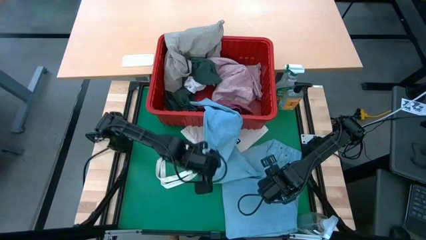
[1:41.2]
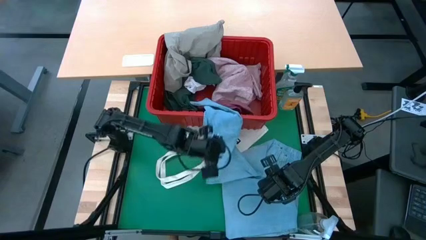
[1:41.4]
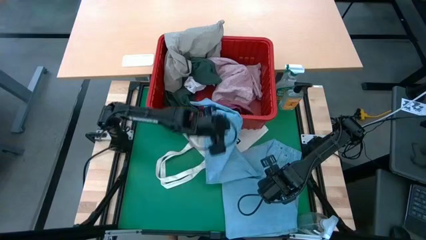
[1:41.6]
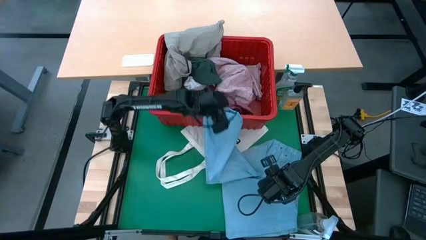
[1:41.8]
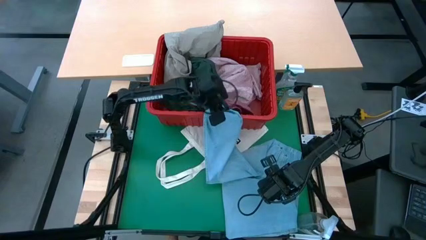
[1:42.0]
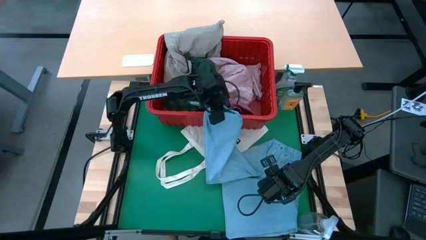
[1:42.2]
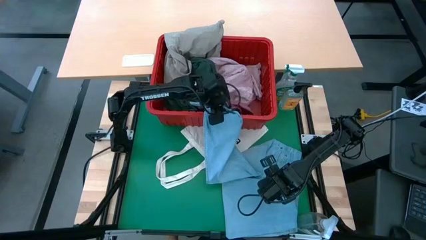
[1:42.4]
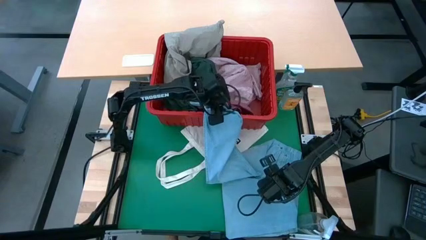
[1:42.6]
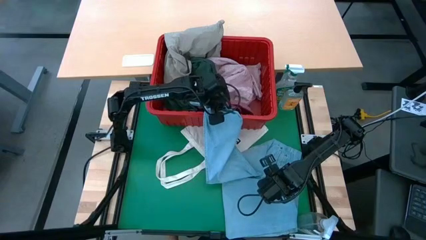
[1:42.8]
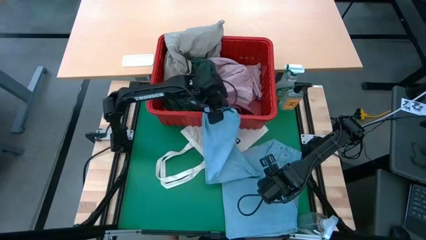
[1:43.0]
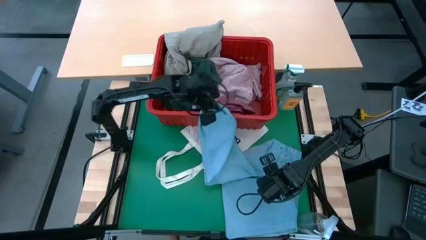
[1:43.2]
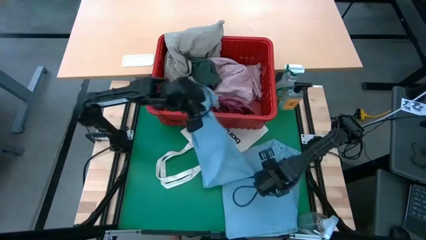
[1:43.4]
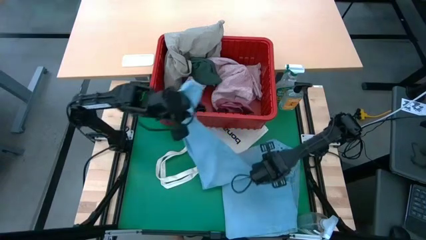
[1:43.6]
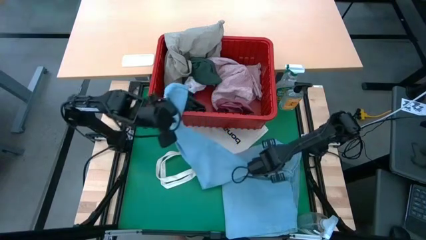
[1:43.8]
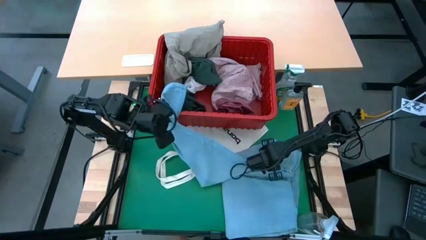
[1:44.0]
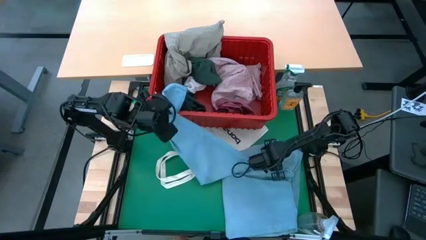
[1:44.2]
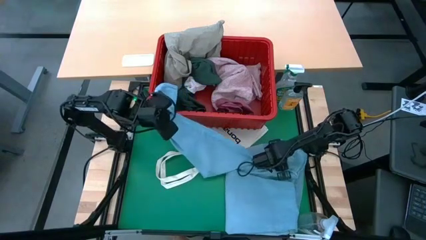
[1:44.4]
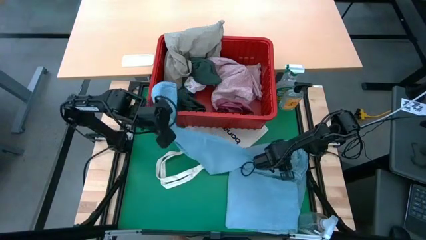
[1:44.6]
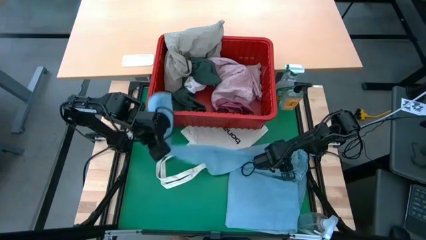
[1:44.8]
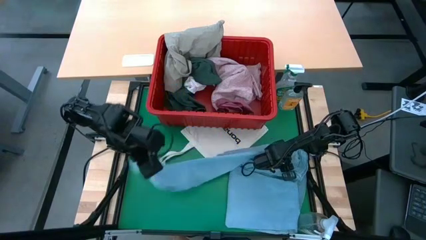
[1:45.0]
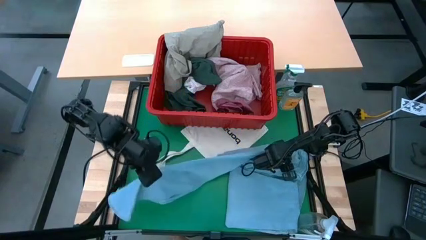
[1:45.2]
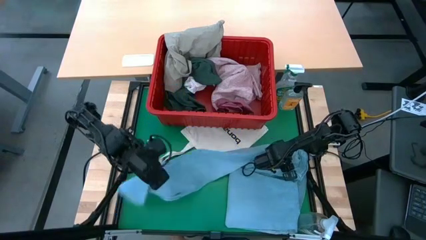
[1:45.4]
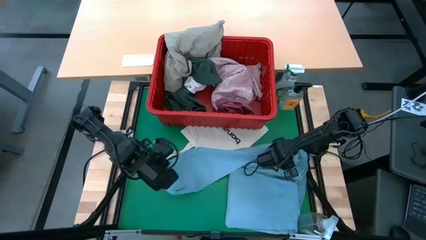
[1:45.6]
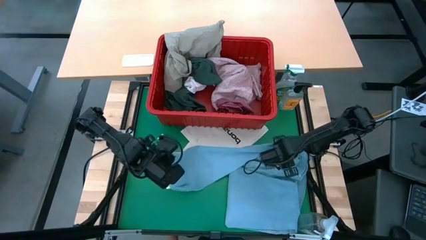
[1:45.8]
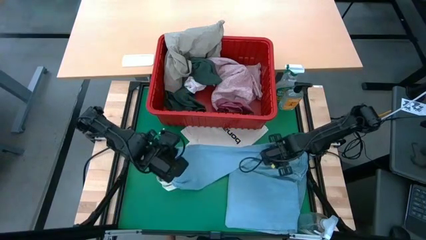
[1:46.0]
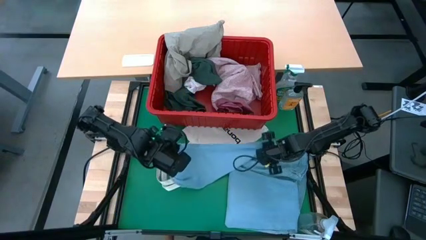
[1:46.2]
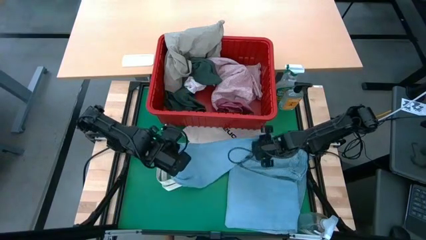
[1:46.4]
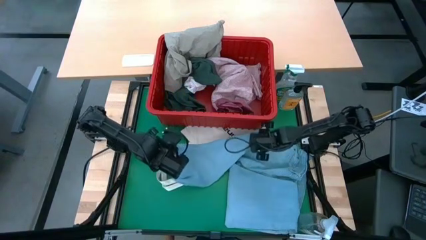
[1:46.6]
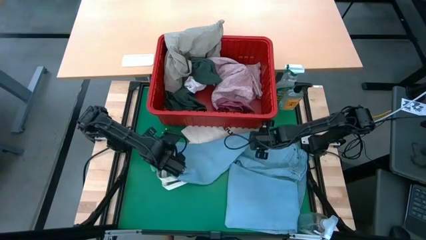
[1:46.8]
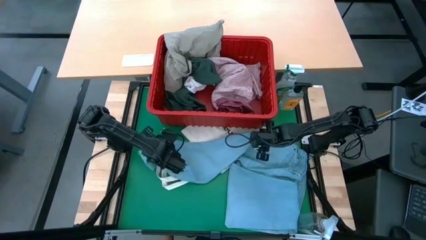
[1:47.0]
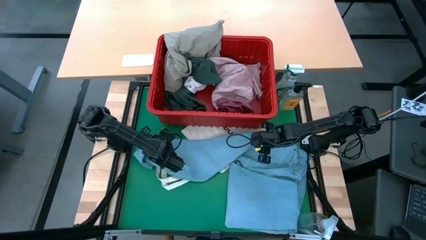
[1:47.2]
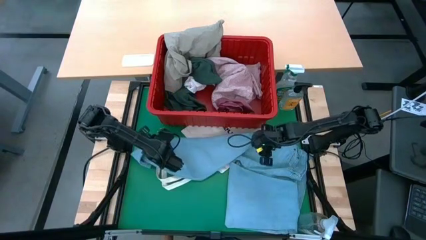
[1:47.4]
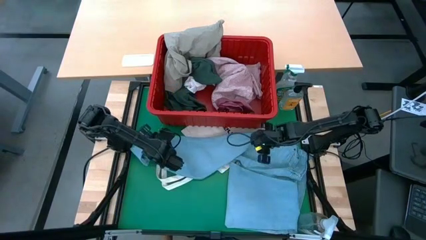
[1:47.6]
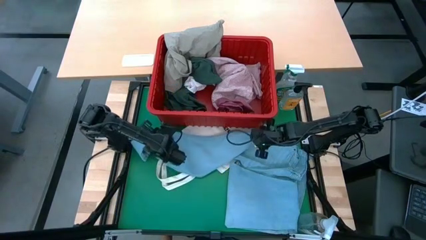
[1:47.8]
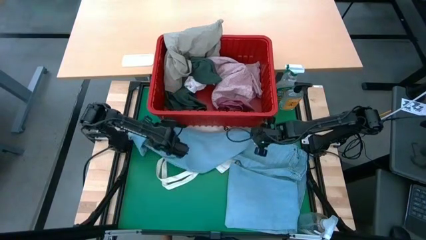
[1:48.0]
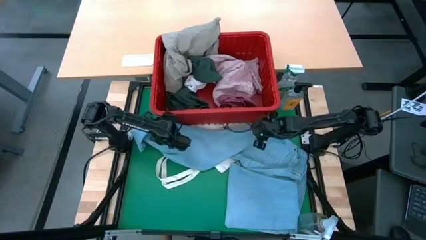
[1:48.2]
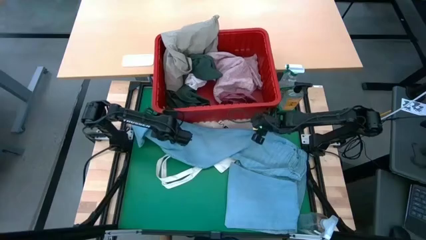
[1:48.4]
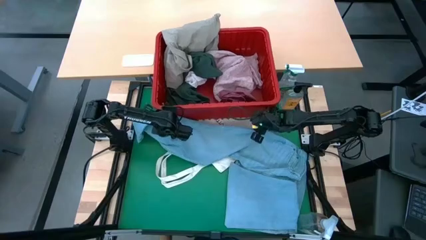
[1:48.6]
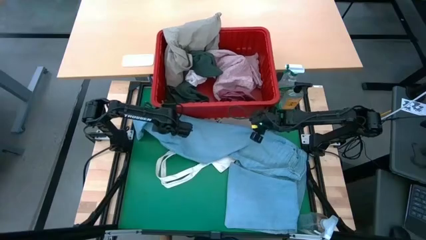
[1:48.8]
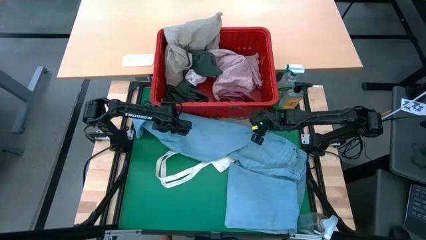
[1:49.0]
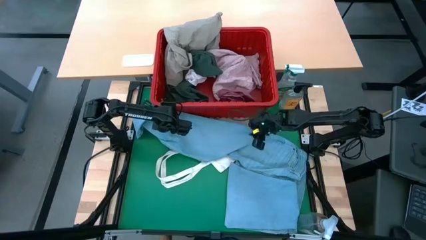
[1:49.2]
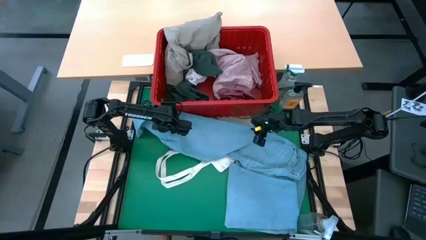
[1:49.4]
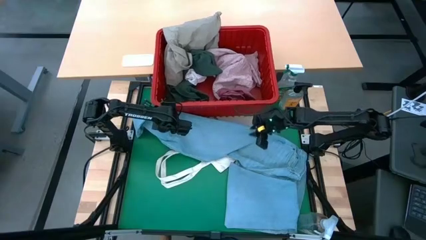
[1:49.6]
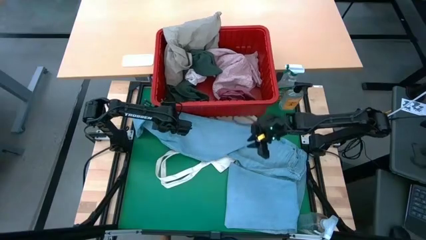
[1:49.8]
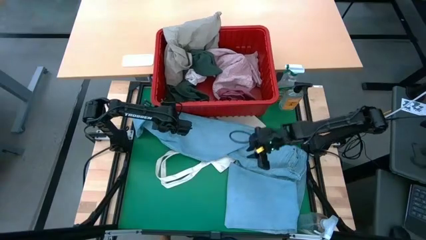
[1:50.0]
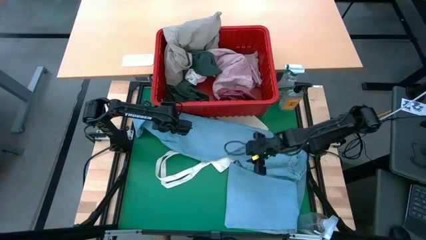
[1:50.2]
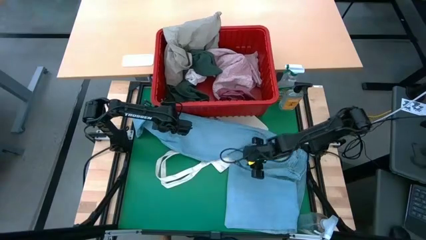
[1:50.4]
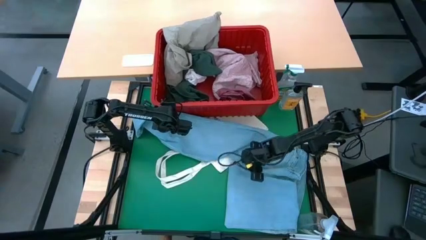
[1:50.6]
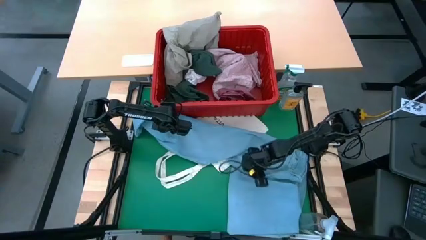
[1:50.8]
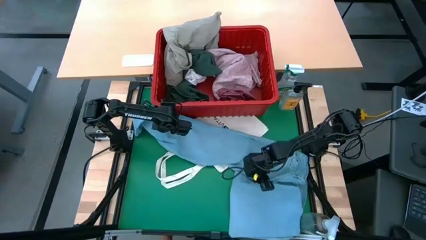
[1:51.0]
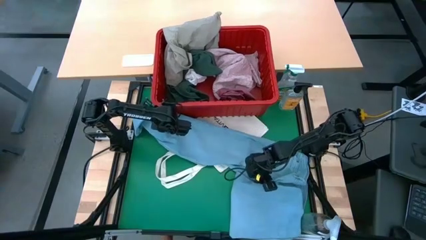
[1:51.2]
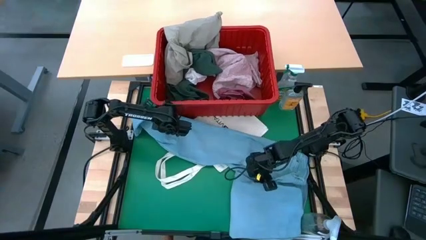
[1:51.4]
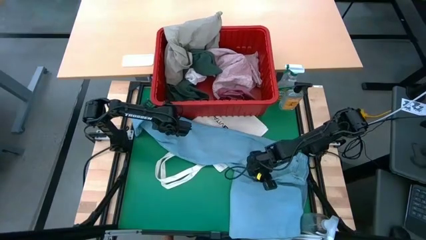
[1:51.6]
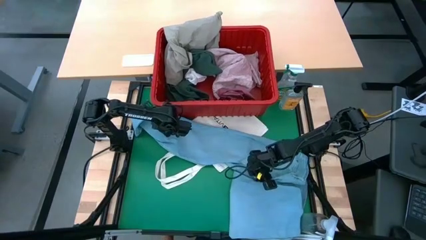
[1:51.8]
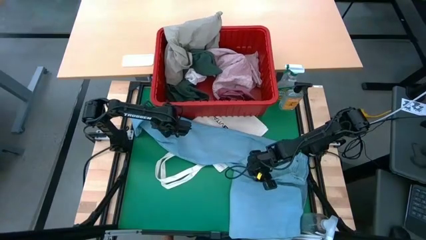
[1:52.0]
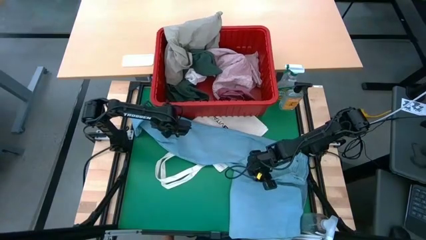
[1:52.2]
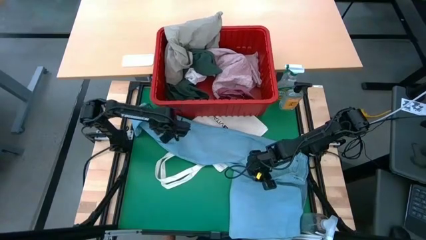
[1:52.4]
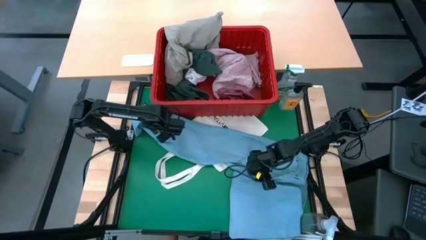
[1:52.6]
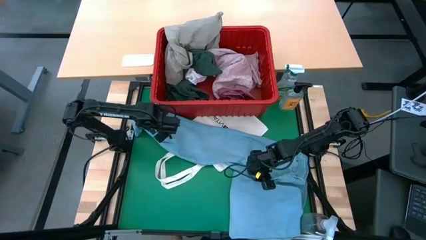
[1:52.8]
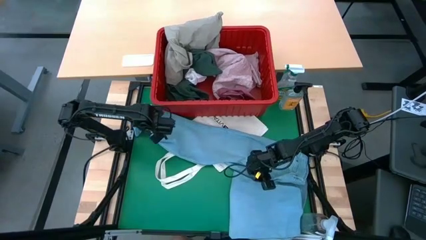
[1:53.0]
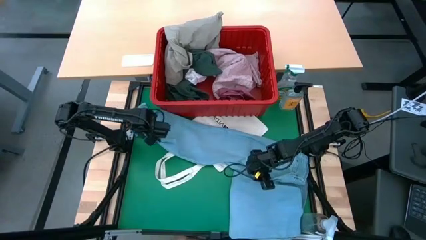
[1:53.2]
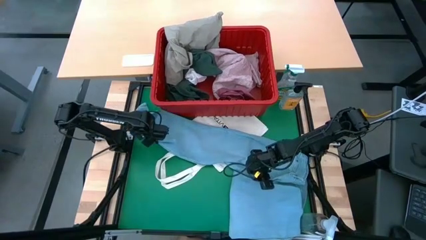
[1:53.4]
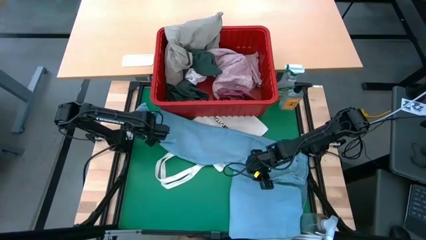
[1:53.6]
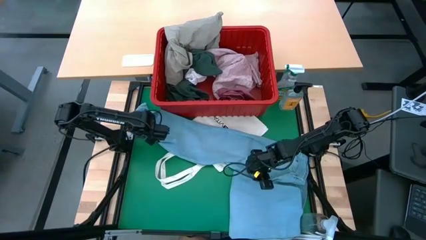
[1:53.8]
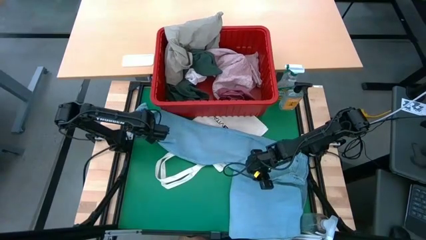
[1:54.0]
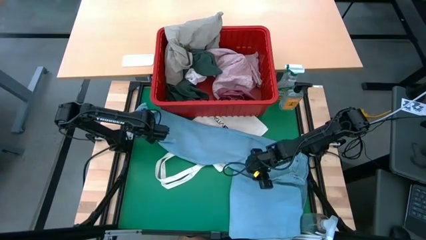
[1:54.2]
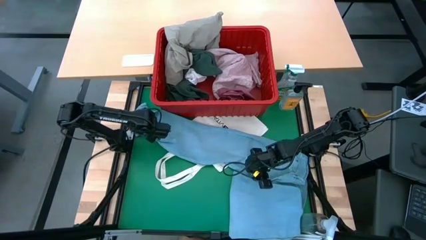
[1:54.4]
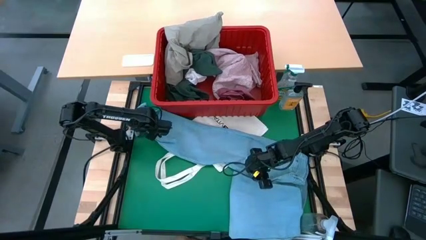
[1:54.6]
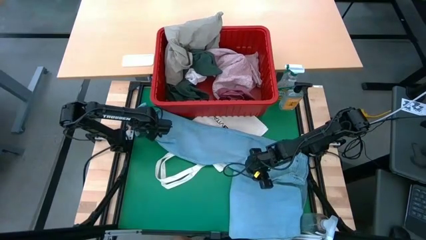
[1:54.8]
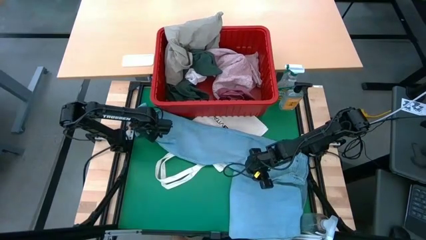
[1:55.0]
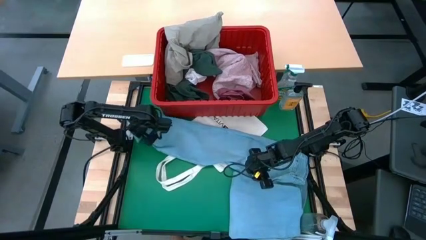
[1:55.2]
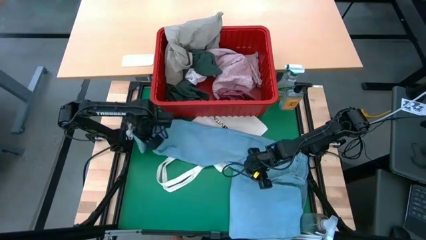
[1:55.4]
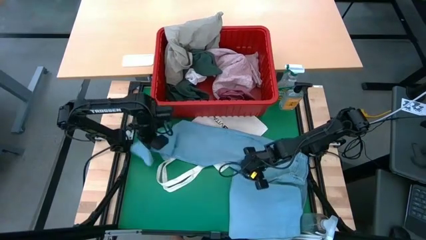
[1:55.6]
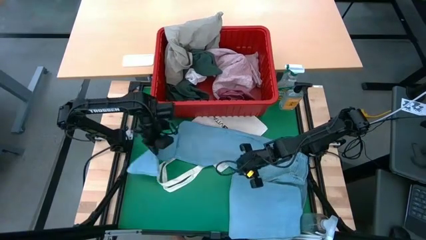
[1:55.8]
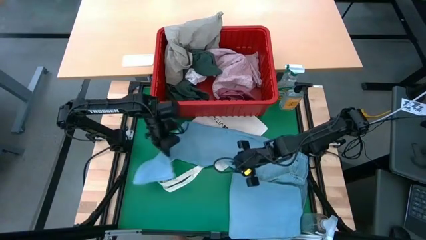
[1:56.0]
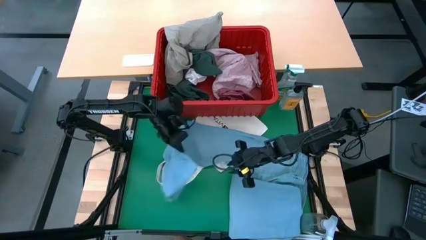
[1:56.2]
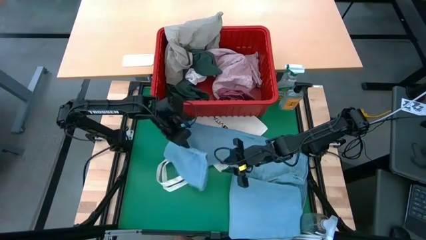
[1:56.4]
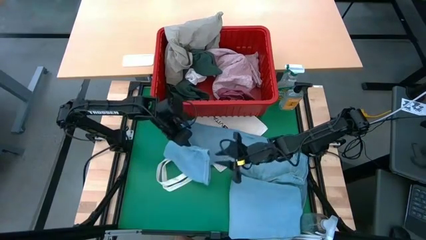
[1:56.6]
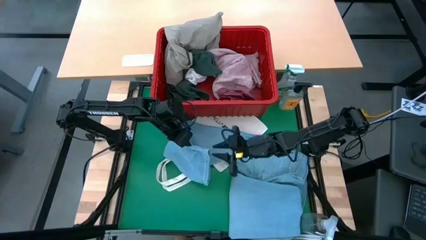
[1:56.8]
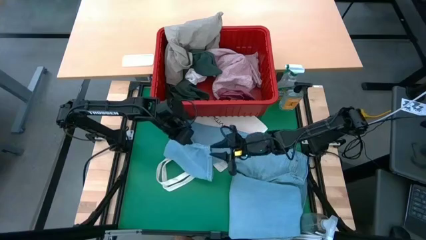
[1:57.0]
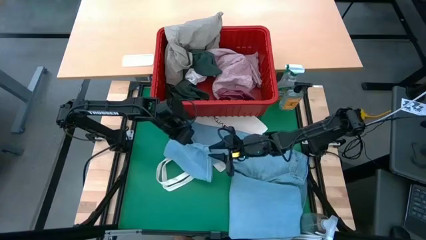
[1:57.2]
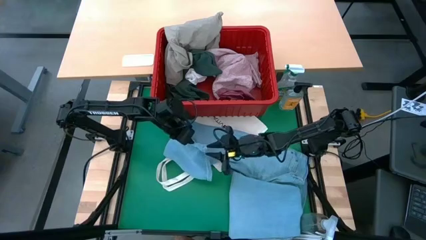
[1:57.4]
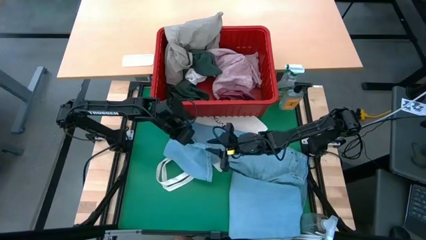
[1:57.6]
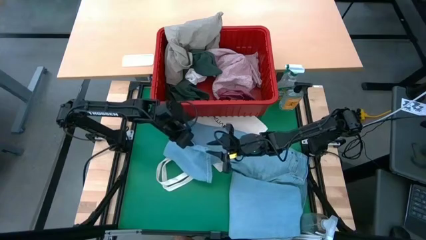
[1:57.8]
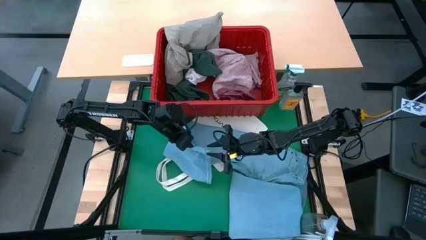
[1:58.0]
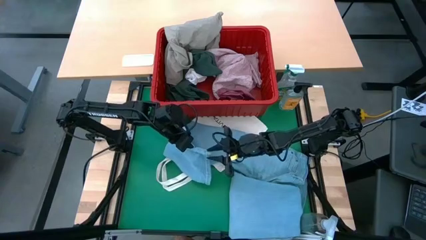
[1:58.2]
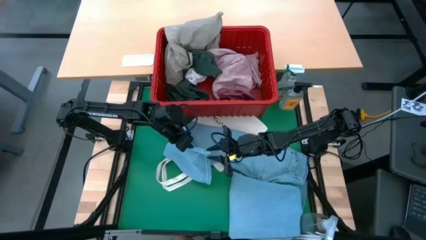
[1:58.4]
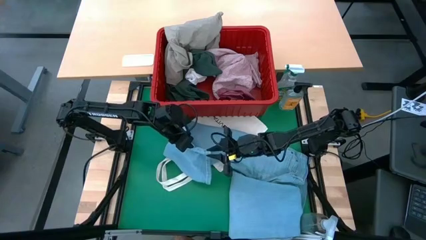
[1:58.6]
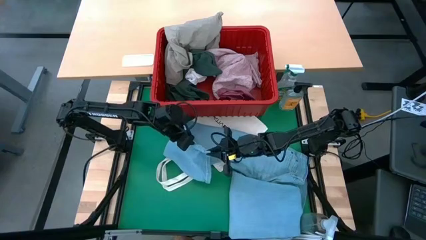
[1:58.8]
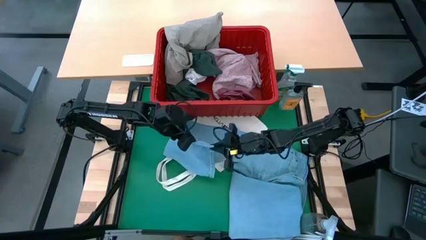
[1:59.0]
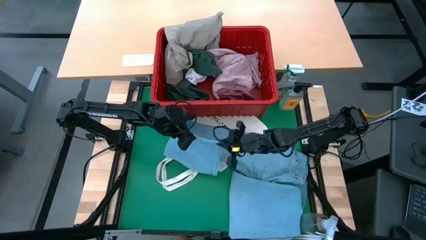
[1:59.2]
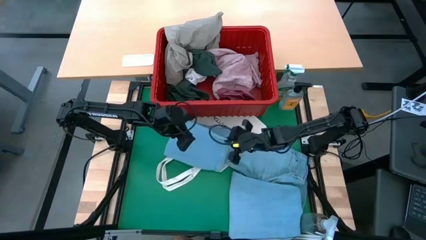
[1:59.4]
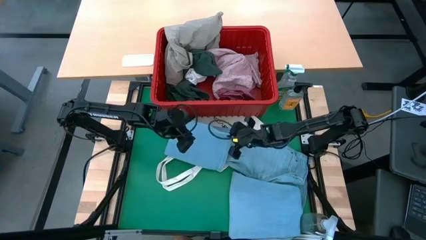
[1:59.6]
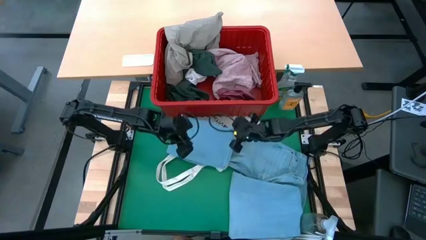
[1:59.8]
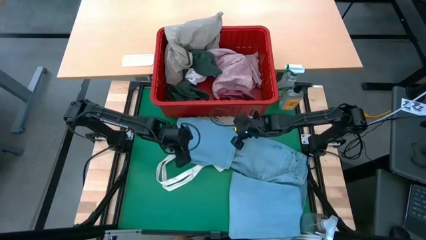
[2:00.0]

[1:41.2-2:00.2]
Task: Fold laundry
Fold the blue jeans
